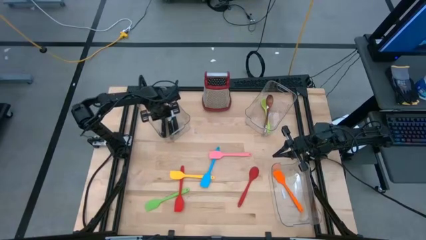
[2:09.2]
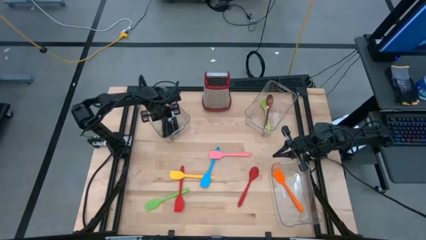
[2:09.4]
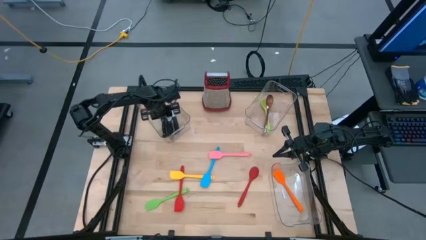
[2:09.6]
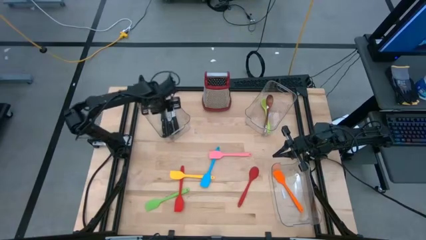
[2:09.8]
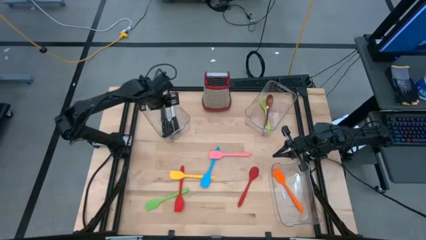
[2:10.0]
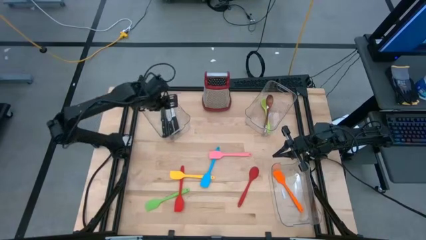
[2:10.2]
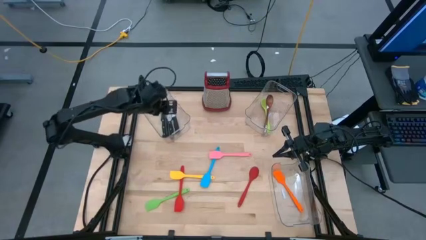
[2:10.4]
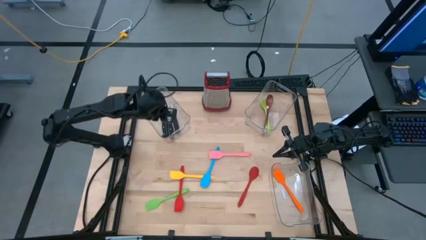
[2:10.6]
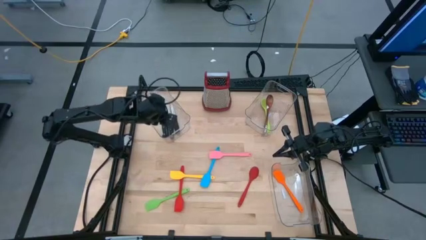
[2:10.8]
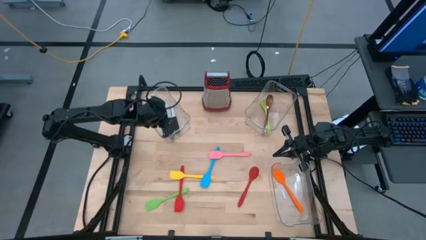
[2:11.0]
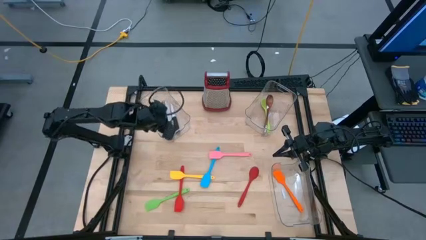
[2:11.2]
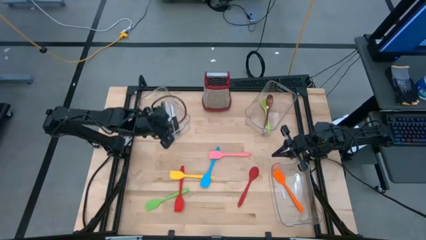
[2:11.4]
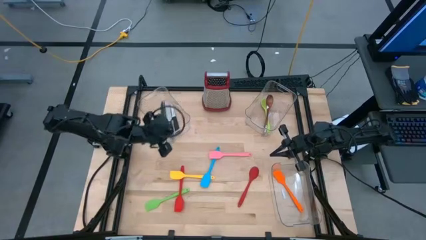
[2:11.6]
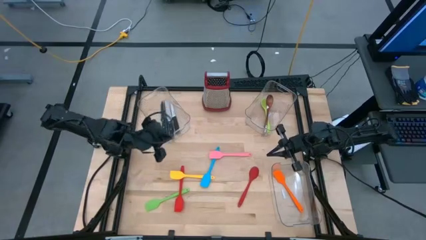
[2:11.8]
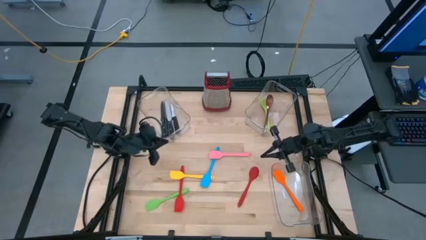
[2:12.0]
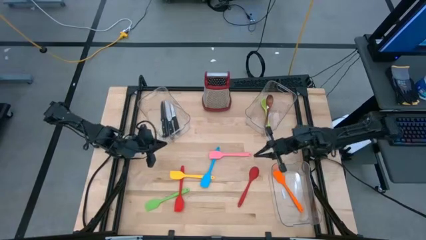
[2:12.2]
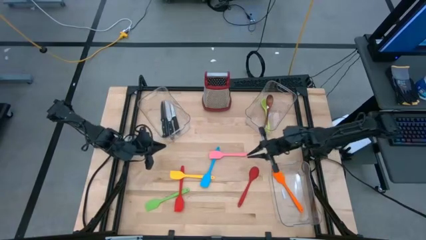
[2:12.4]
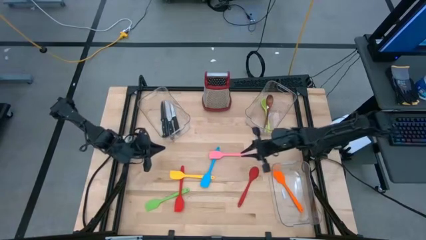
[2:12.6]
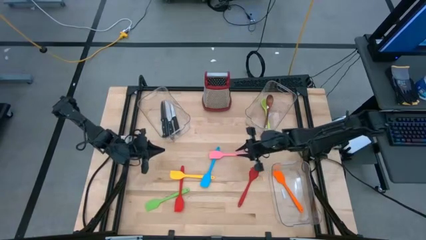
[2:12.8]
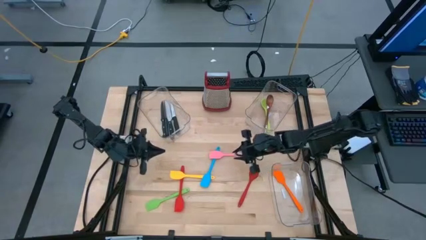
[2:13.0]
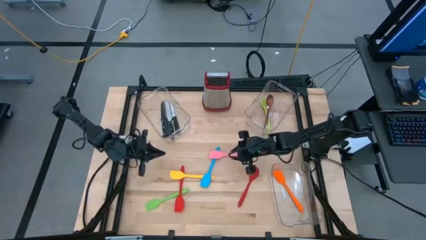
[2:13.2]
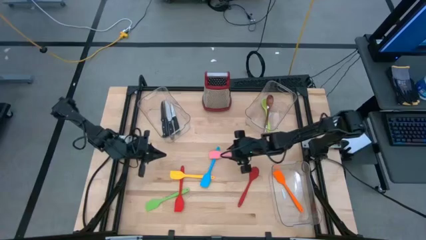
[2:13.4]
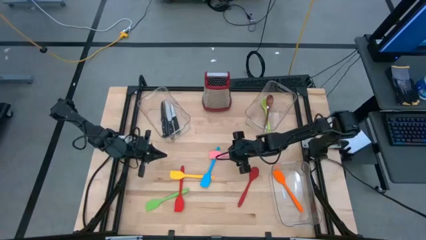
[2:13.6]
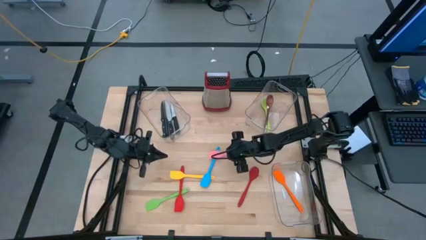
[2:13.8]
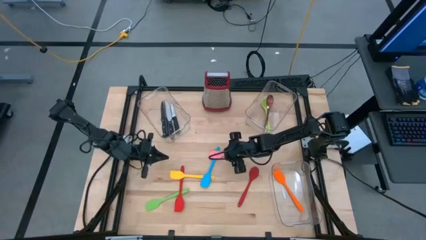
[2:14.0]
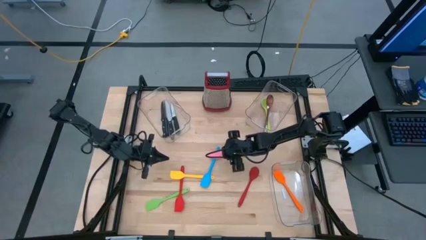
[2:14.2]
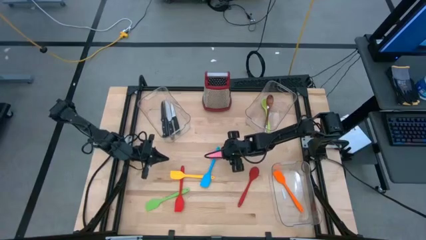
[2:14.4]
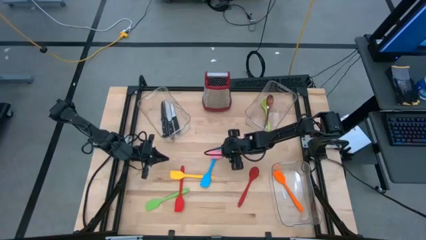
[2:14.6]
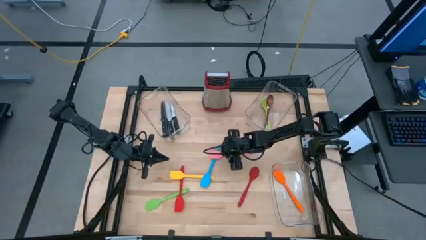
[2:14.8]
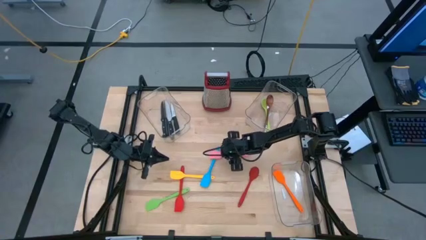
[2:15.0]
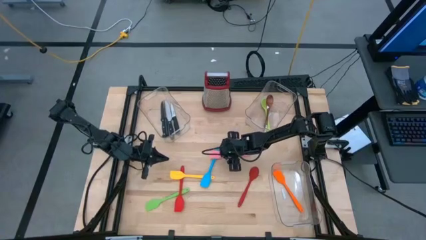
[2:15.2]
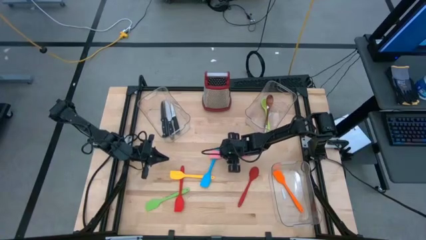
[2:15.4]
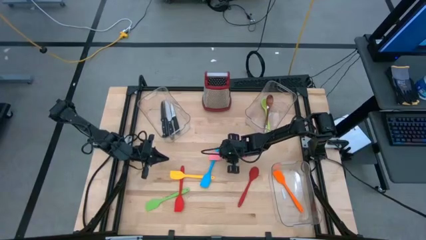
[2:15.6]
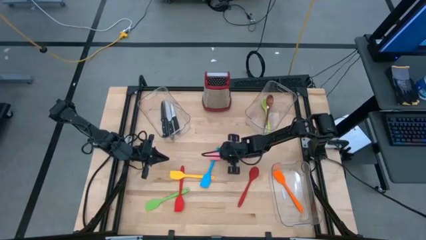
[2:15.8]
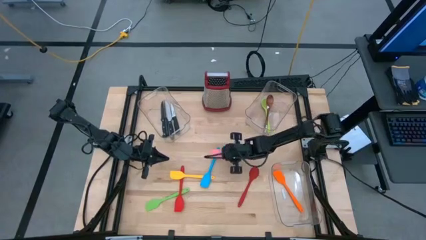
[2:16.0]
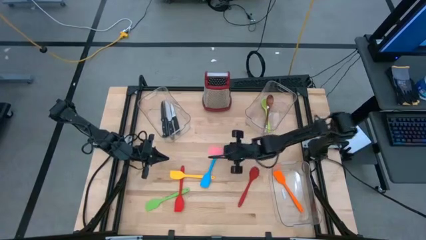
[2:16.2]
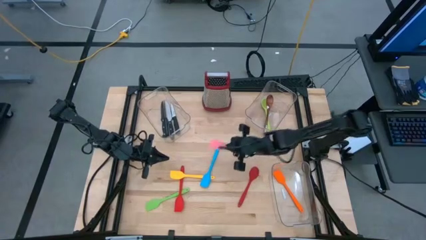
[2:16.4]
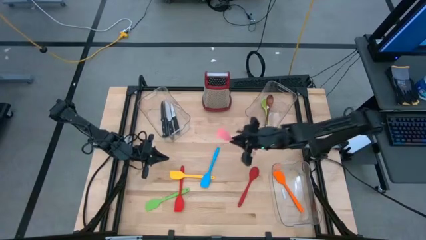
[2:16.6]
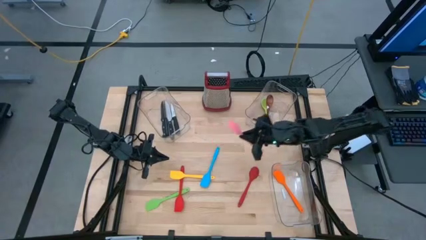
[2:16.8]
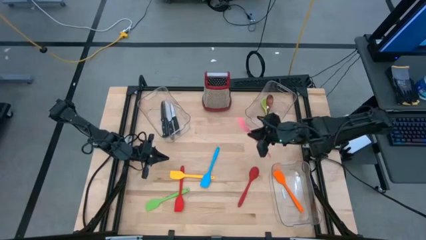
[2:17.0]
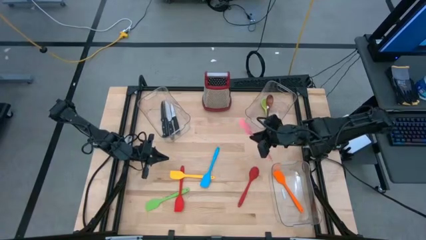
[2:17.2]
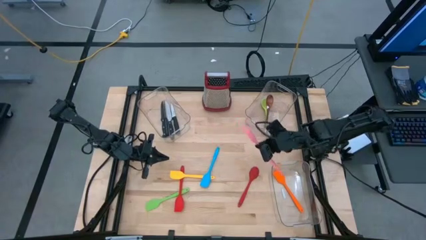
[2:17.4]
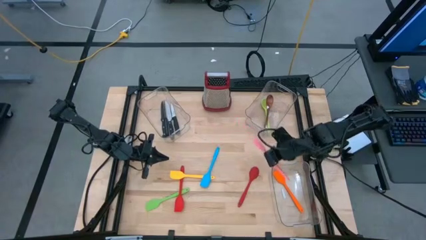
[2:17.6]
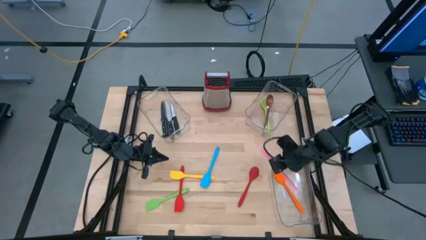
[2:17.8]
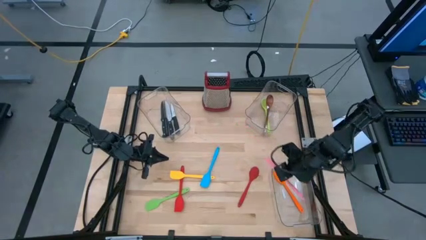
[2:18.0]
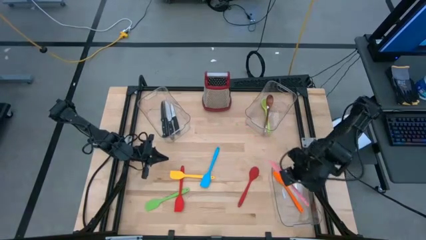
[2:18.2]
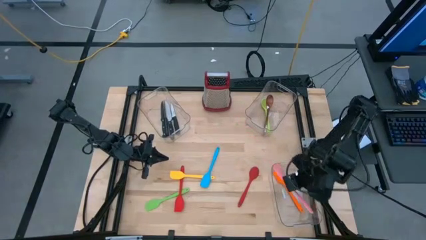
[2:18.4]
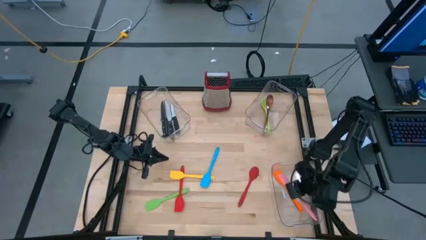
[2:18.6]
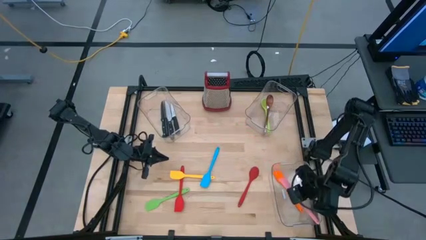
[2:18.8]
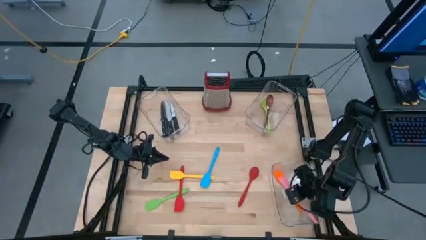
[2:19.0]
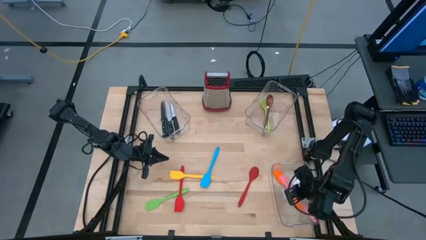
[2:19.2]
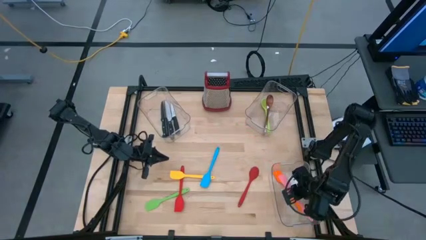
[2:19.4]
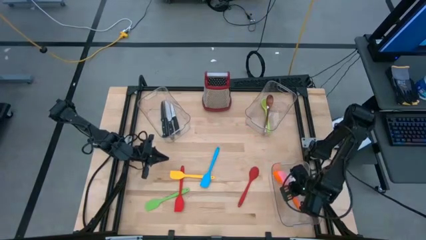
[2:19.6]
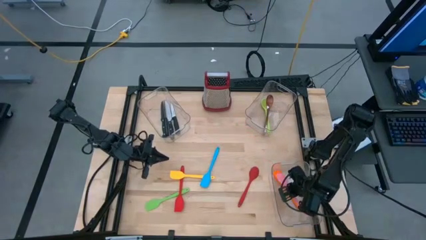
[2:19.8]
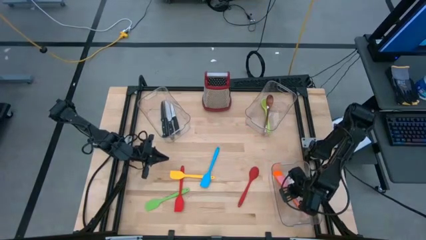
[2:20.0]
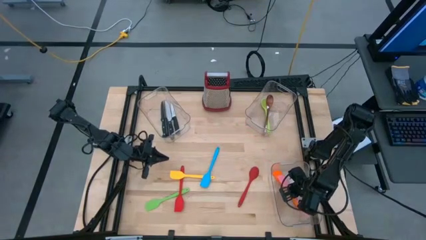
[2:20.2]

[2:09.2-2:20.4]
Task: Pick & Place Kitchen Items
Put the pink spatula into the bottom right transparent bin
